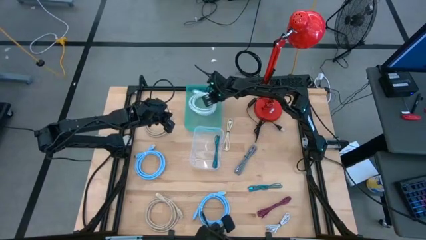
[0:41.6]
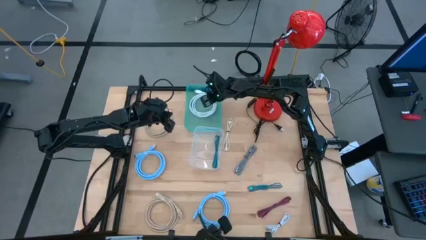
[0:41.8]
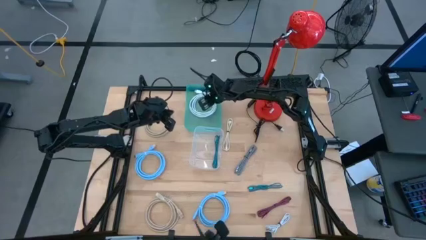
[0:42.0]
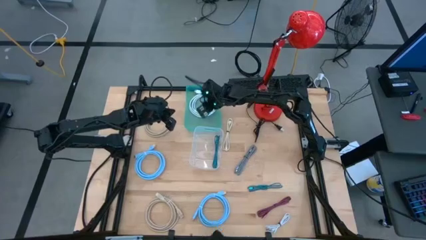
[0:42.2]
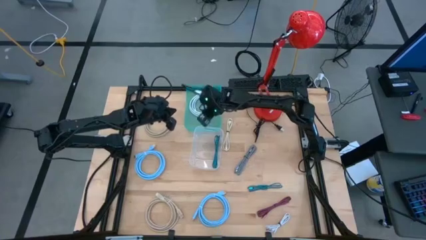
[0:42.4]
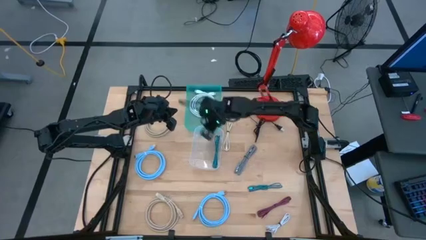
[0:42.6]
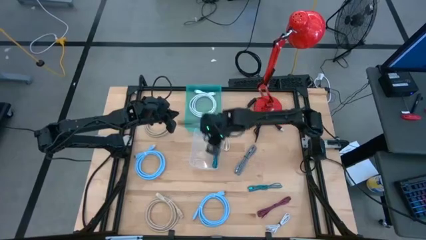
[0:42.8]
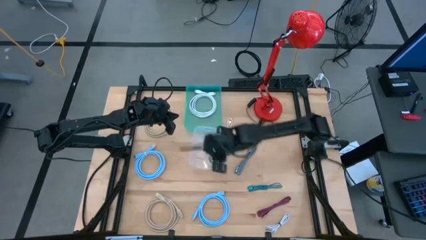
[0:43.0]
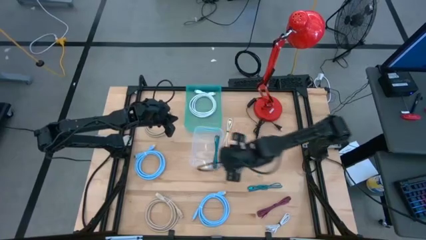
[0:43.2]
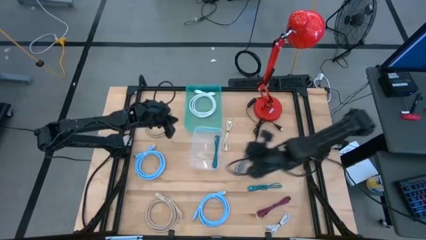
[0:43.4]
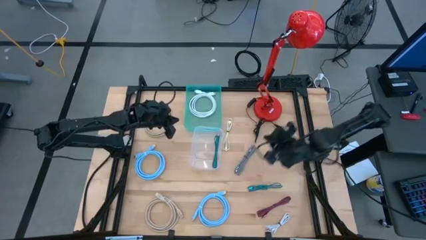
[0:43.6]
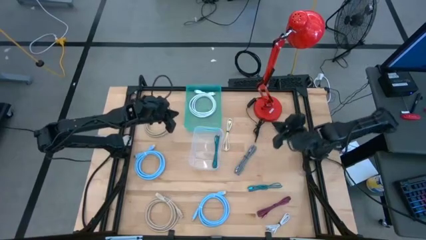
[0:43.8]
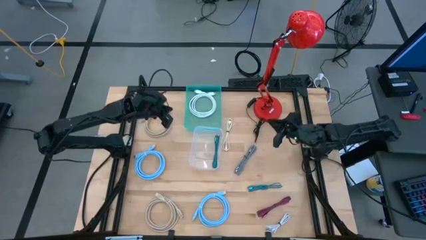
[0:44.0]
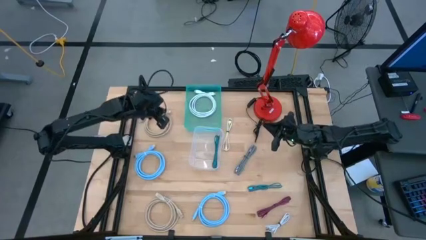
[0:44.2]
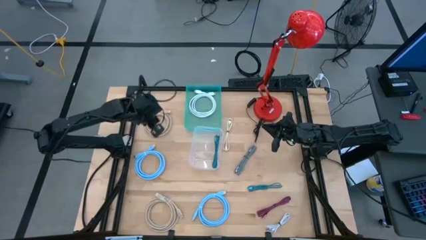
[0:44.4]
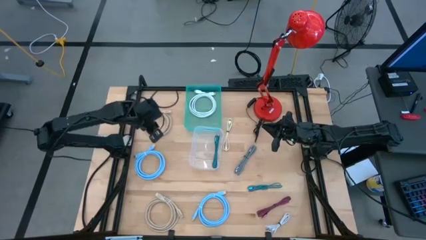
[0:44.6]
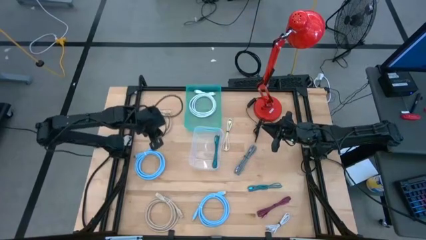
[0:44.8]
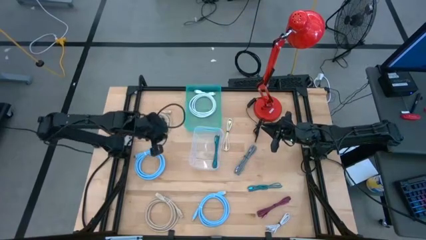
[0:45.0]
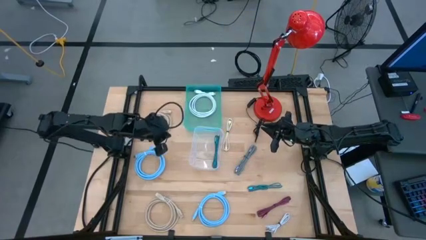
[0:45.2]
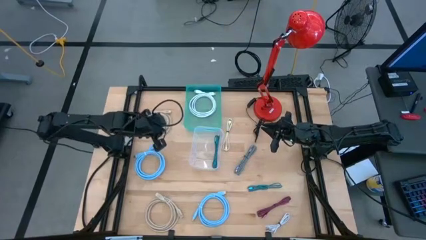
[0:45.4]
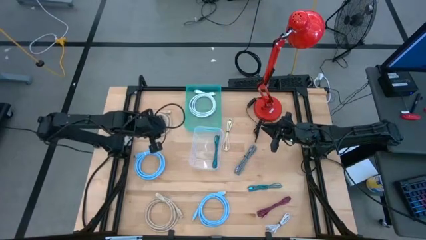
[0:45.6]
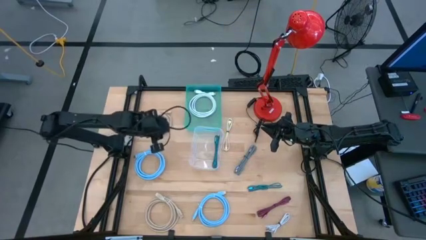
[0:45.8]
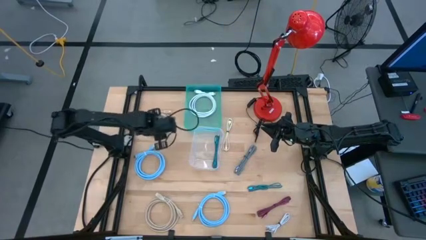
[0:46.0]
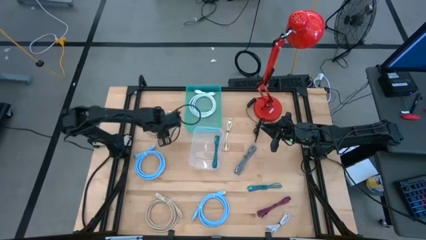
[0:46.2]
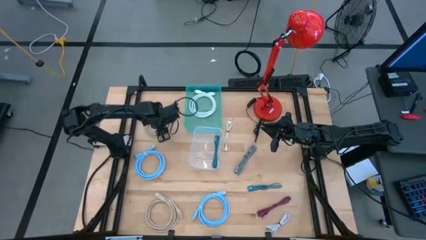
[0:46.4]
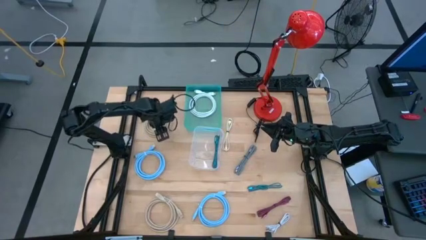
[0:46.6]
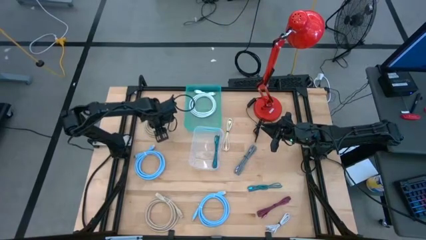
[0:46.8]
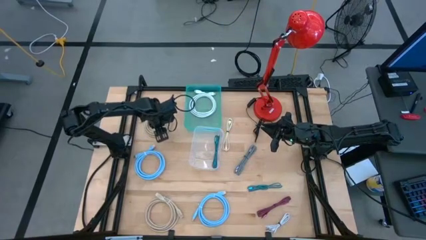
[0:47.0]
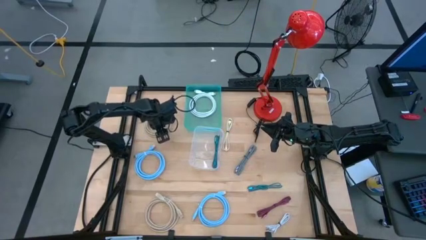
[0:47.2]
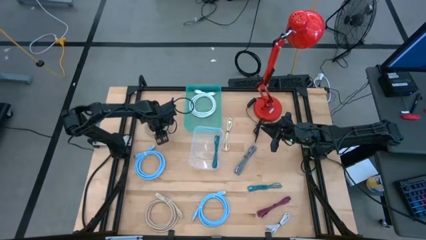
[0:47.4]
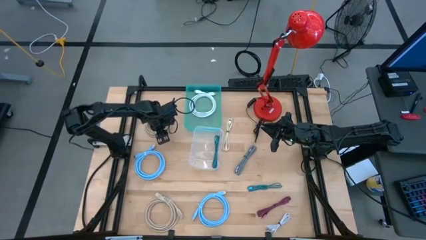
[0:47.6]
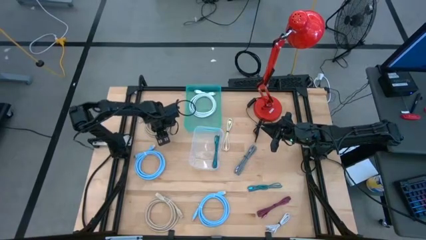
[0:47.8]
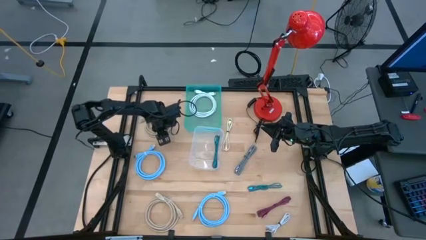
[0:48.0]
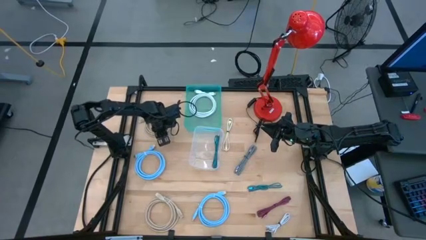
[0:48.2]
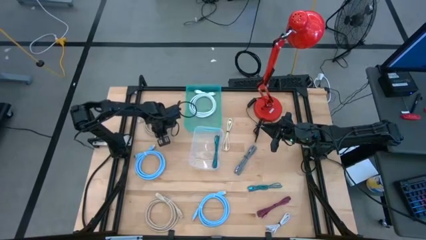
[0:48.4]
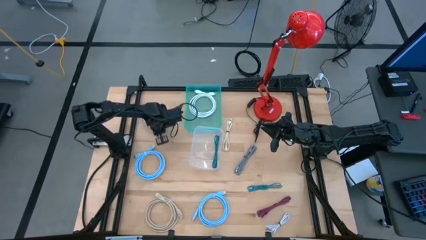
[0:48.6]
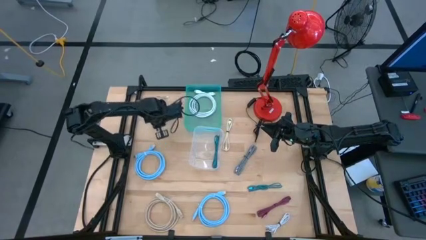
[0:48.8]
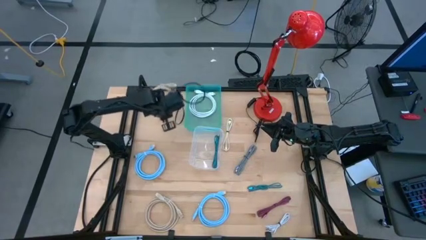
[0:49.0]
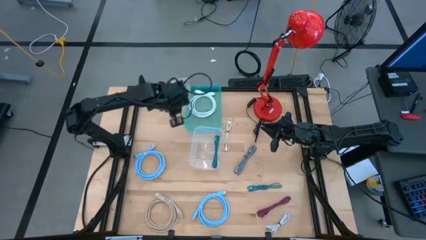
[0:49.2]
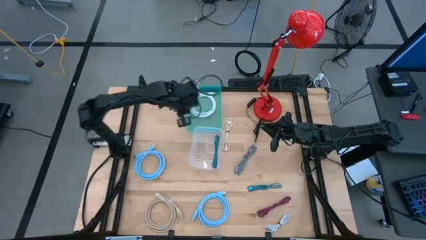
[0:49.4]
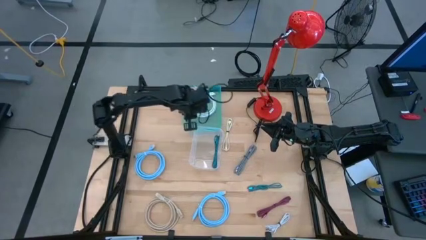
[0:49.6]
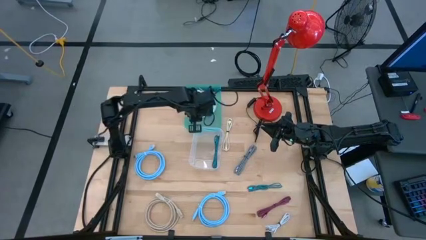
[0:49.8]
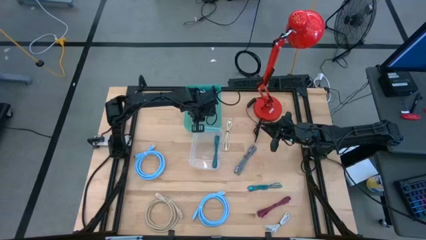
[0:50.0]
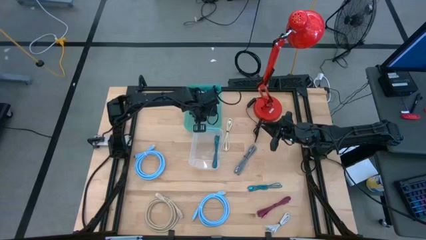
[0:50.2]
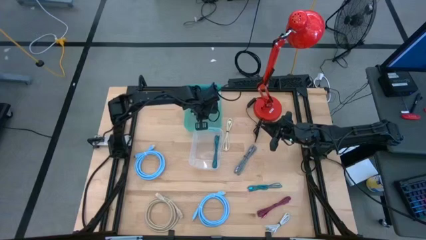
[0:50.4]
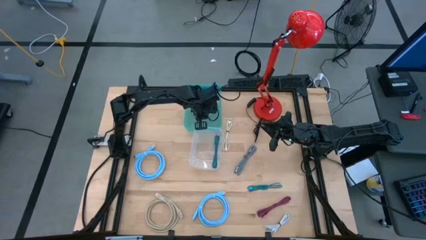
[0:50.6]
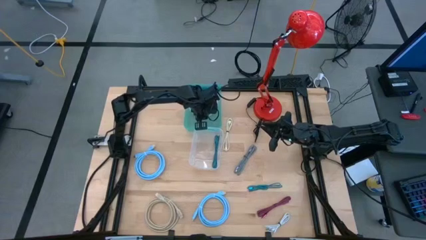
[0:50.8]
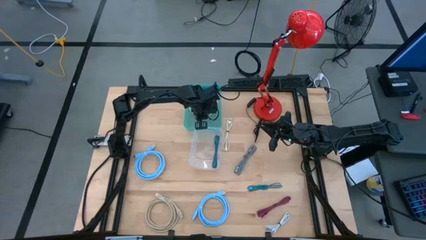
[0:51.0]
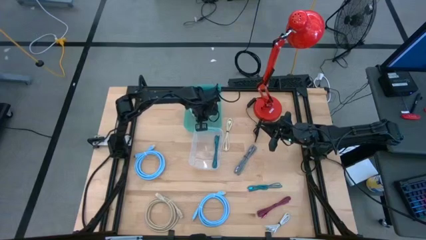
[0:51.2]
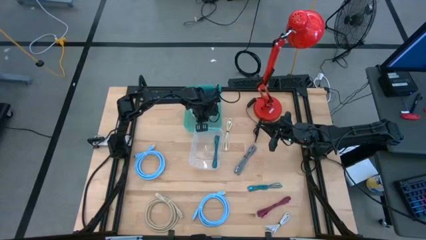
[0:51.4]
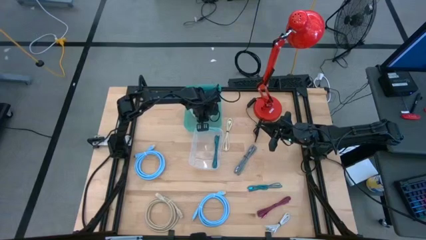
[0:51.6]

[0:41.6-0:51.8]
Task: Pick & Place USB Port
Put the top brown rolled USB cable into the blue bin
